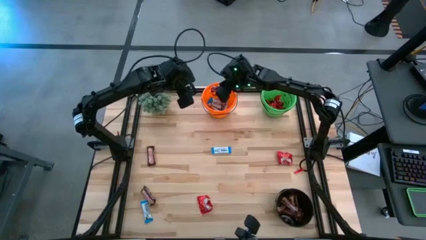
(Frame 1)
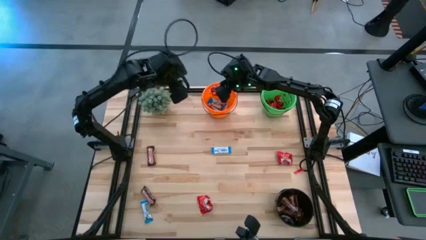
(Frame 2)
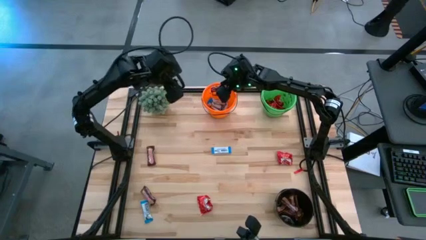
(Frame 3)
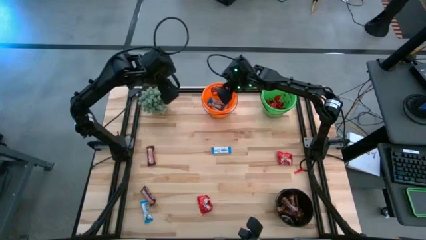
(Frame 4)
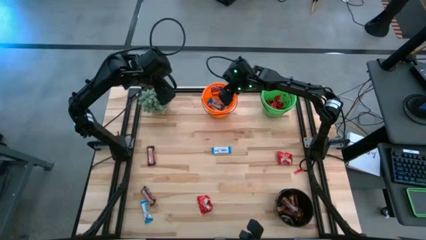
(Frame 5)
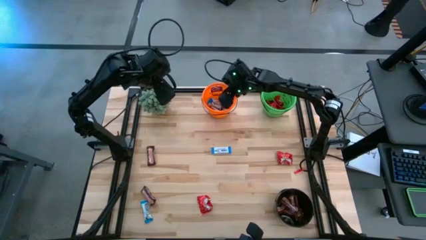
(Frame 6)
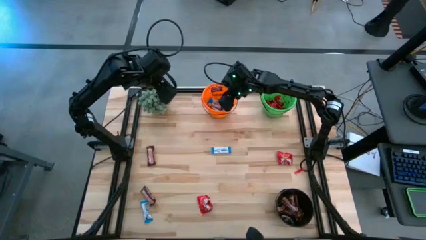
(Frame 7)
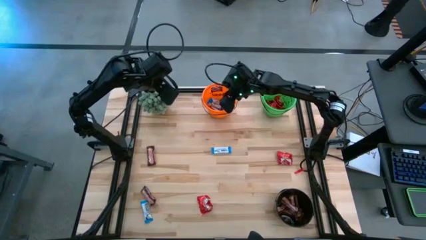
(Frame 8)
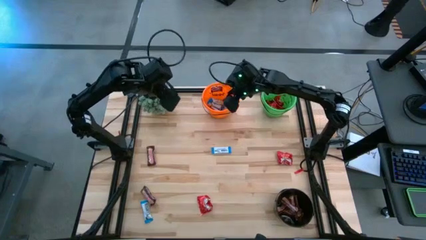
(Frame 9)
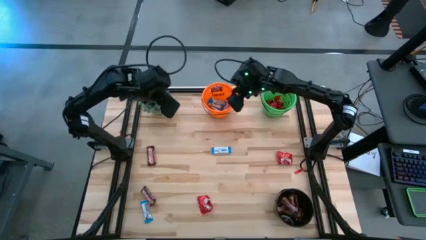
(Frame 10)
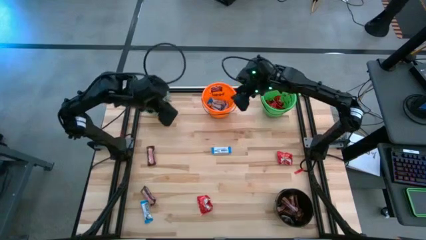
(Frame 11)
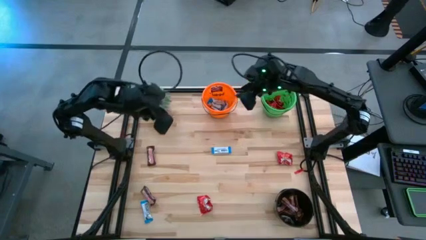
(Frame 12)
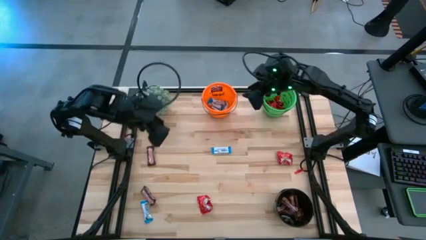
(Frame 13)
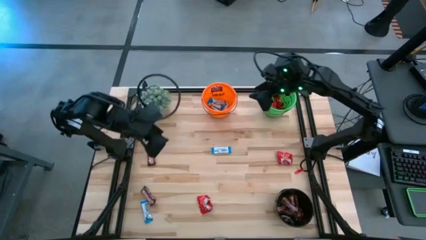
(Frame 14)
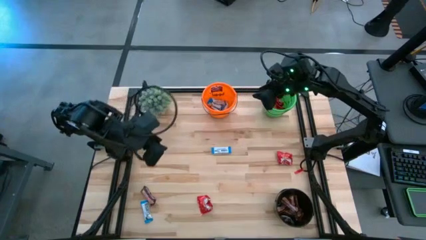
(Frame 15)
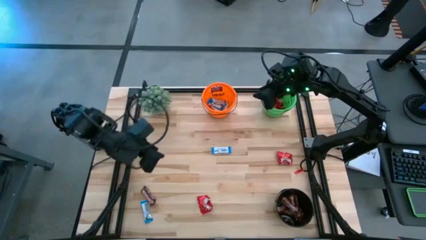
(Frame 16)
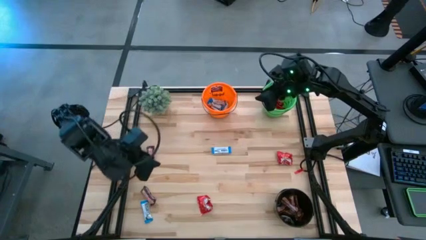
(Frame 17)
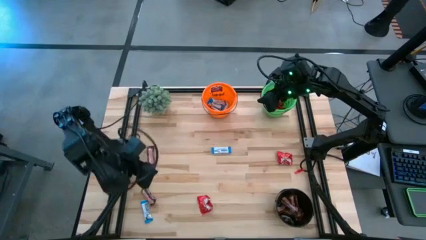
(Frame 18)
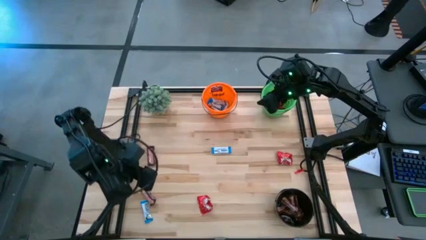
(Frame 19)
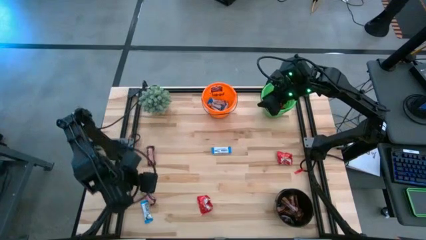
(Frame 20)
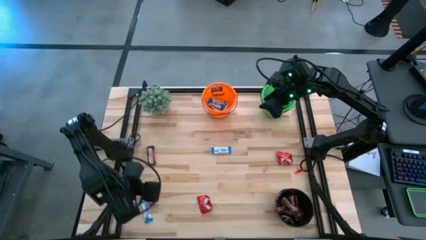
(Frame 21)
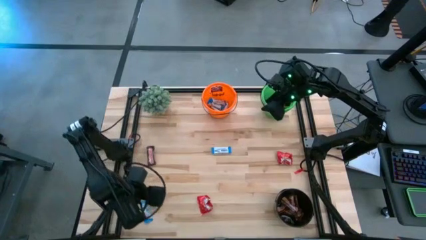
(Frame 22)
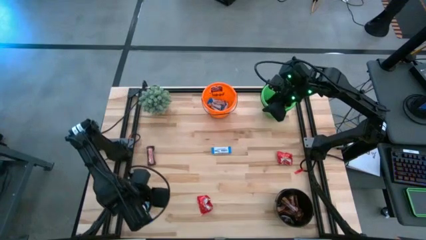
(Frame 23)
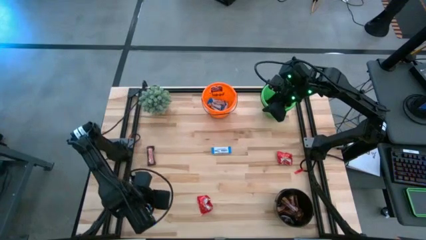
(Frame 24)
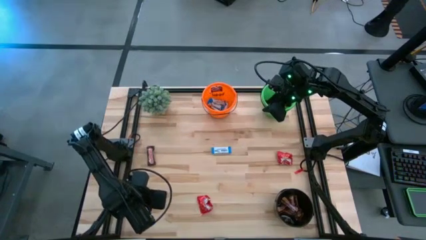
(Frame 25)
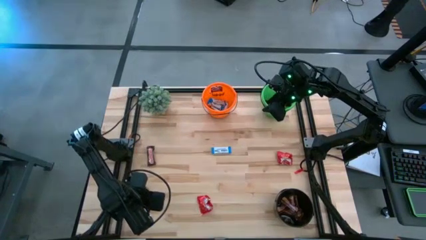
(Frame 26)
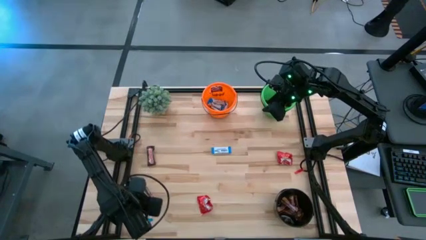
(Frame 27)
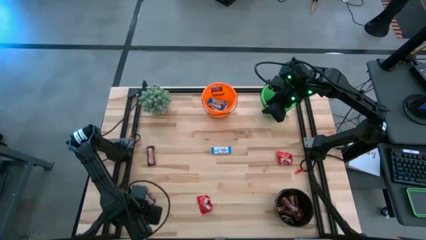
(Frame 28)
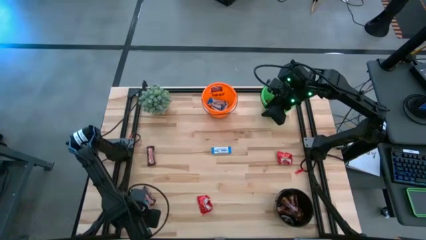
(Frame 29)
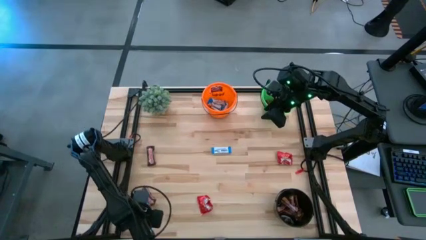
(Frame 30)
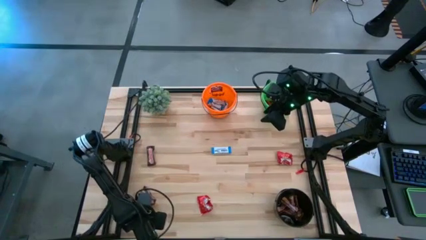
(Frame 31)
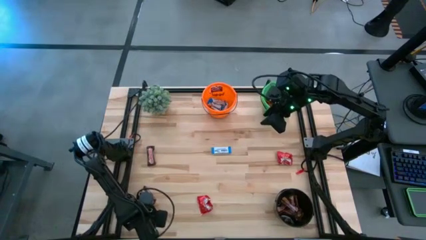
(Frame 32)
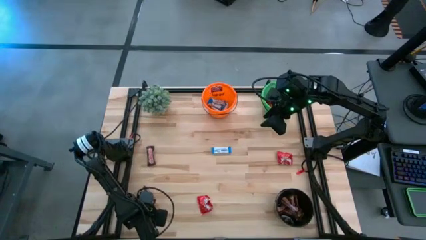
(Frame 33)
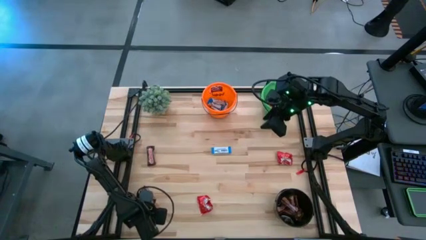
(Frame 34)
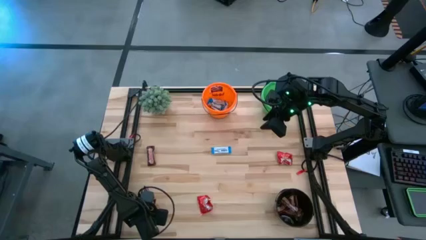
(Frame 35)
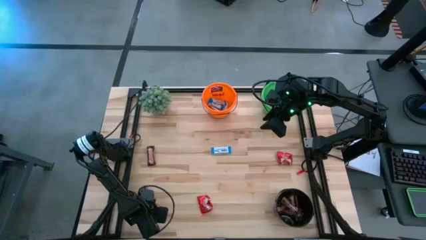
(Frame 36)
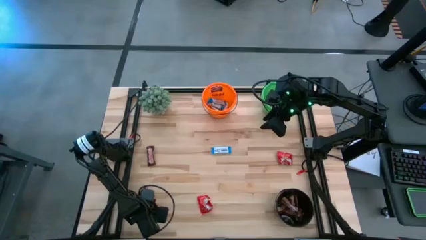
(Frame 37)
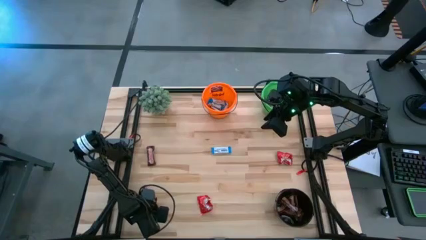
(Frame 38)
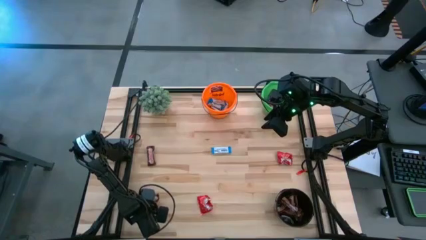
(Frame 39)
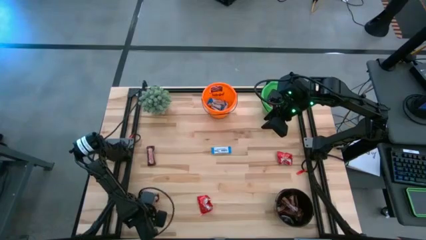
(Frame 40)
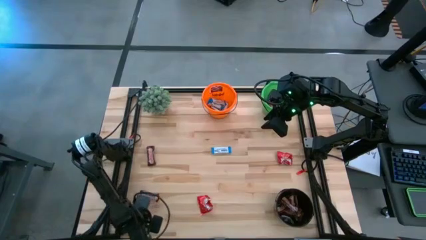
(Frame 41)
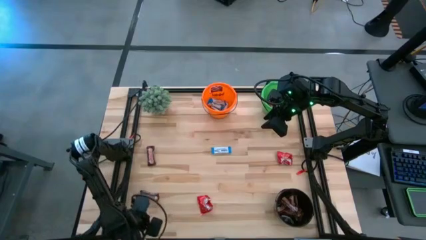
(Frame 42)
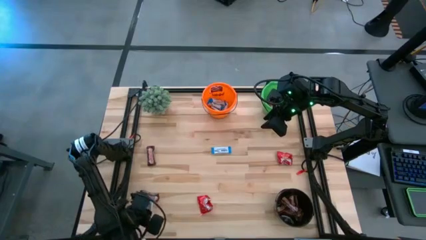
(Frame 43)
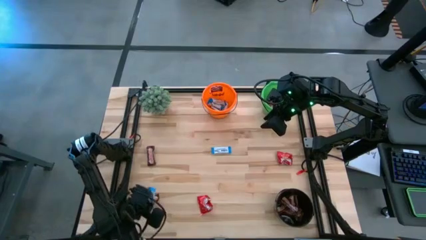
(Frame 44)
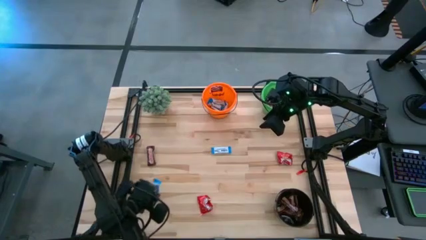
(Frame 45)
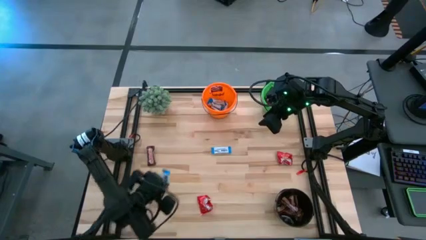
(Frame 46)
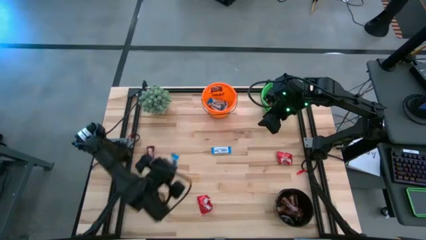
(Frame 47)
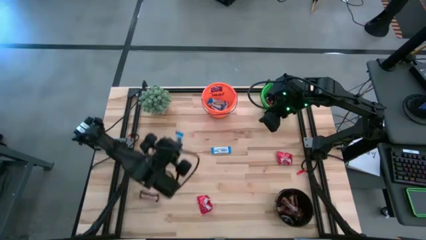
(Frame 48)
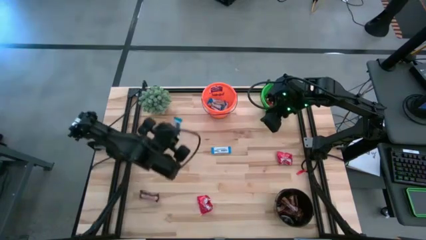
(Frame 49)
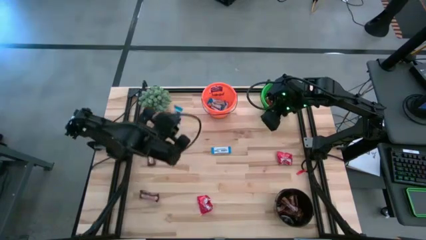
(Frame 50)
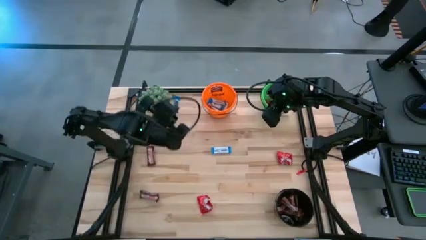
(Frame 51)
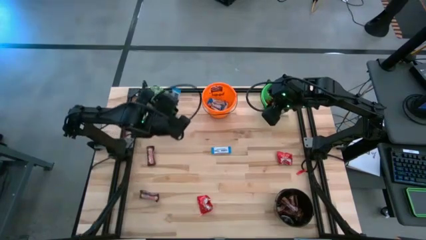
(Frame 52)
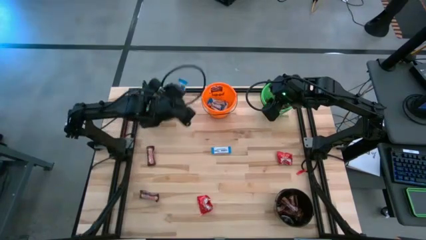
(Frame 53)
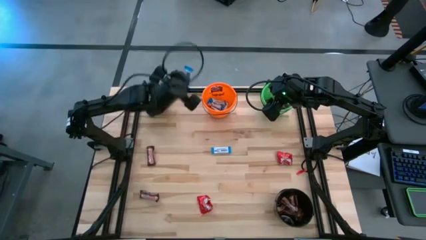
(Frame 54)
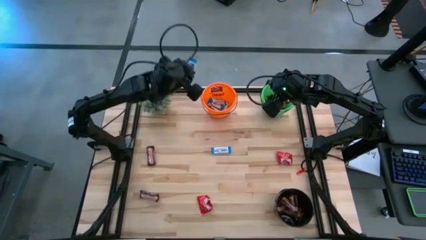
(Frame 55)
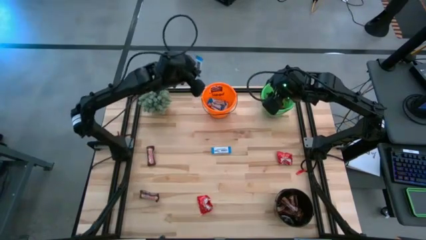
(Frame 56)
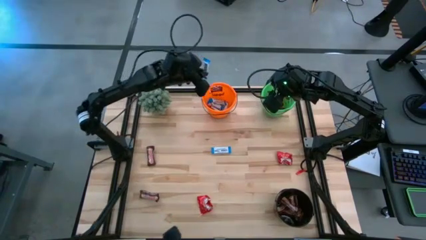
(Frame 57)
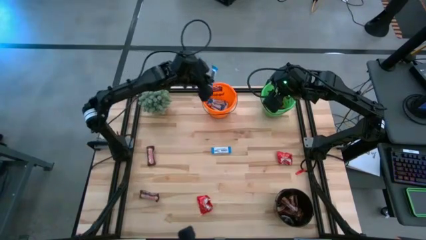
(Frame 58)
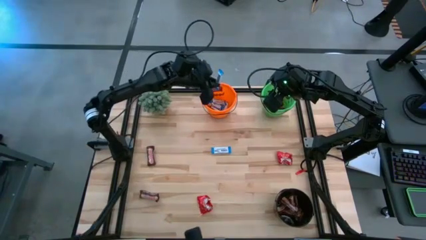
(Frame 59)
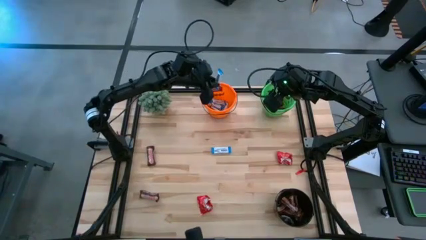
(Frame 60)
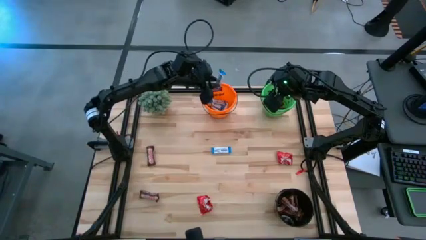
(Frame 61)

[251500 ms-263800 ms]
Task: Organize candy in baskets
Put the white chocolate bar into the orange bucket

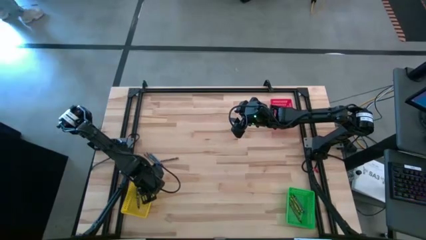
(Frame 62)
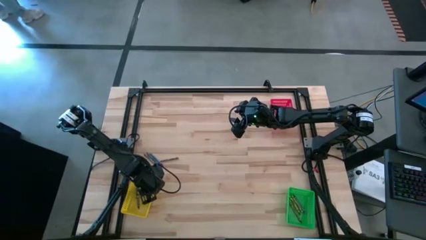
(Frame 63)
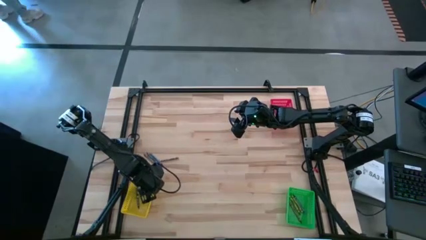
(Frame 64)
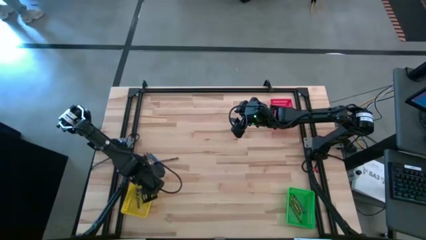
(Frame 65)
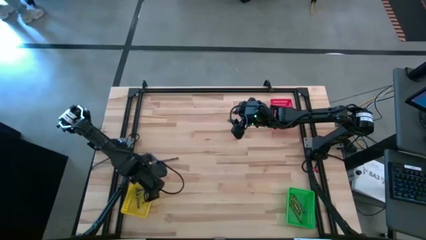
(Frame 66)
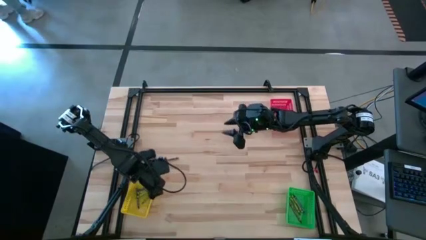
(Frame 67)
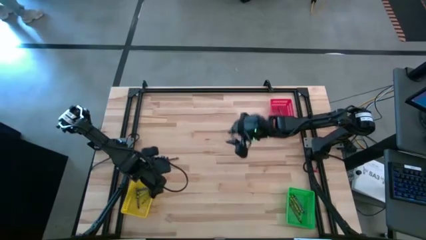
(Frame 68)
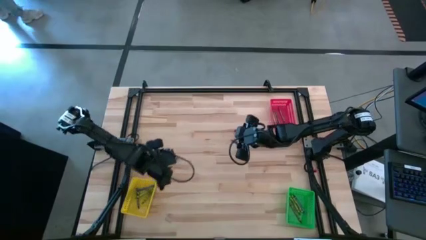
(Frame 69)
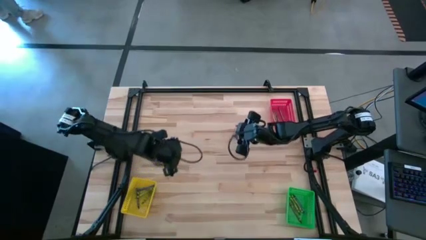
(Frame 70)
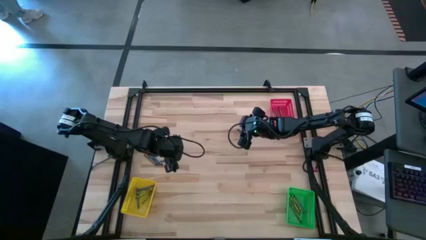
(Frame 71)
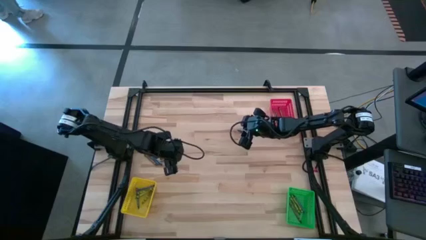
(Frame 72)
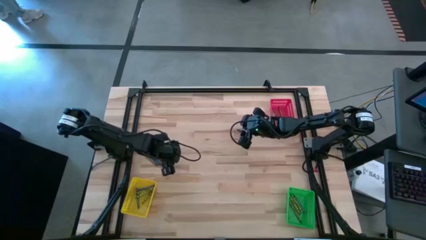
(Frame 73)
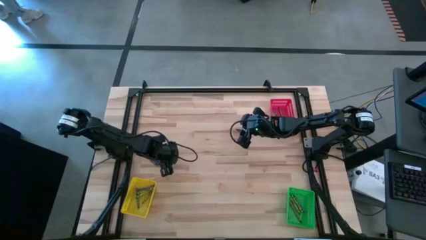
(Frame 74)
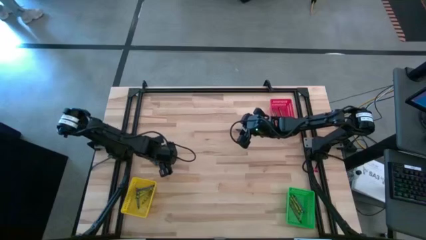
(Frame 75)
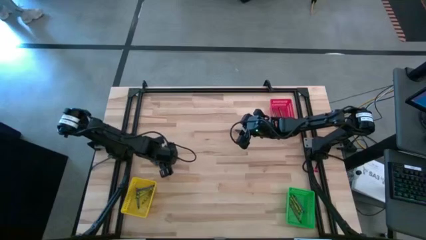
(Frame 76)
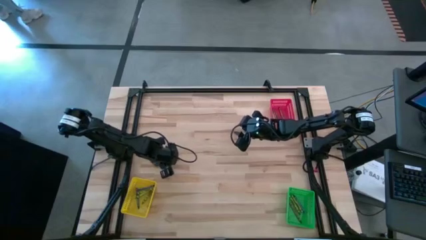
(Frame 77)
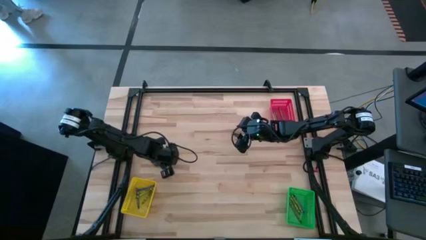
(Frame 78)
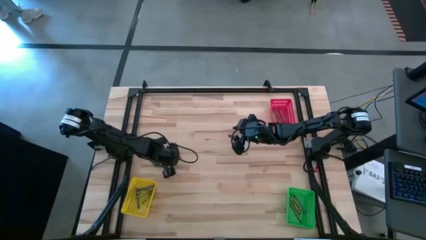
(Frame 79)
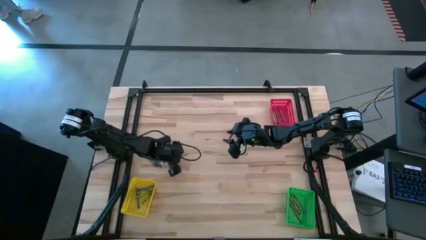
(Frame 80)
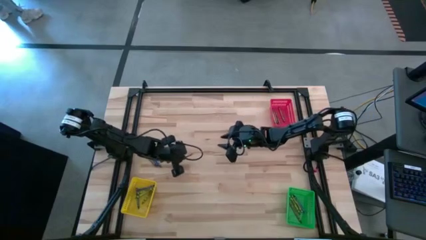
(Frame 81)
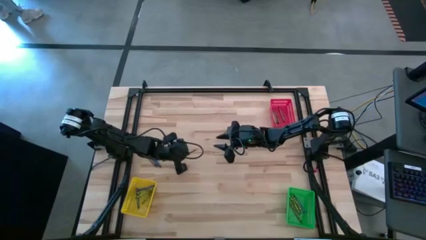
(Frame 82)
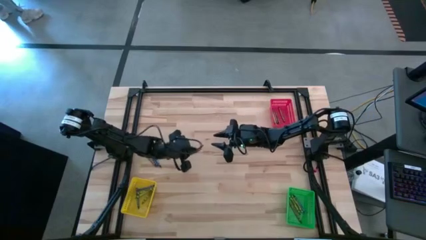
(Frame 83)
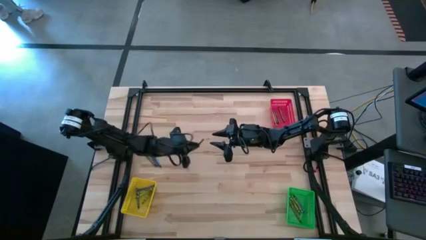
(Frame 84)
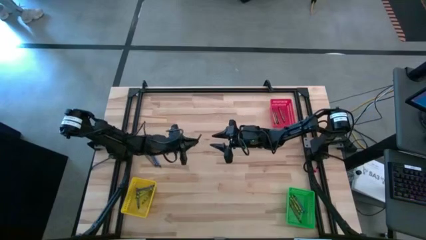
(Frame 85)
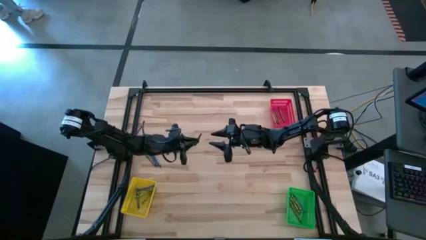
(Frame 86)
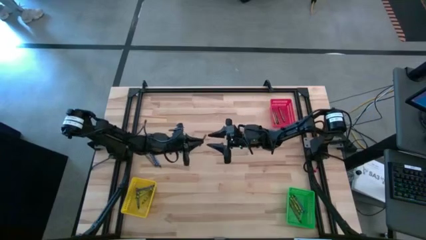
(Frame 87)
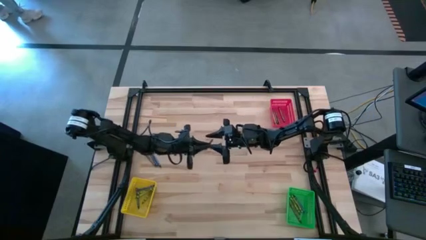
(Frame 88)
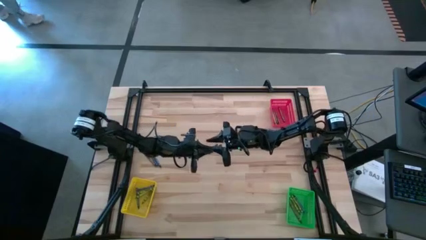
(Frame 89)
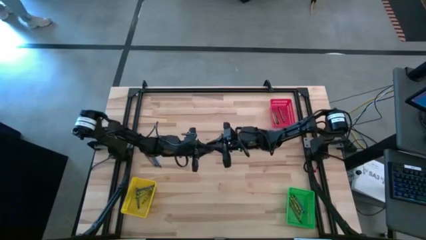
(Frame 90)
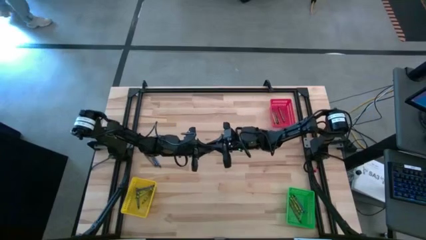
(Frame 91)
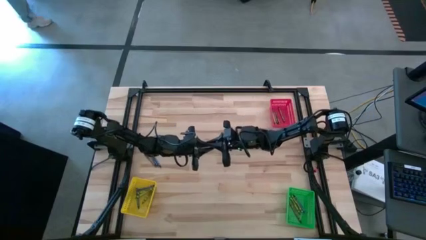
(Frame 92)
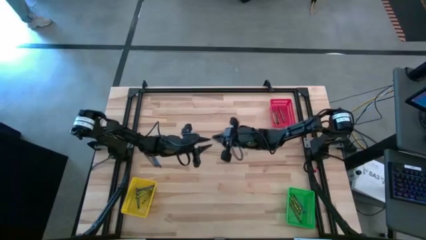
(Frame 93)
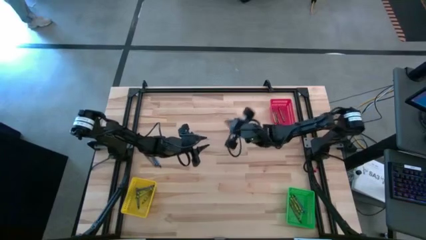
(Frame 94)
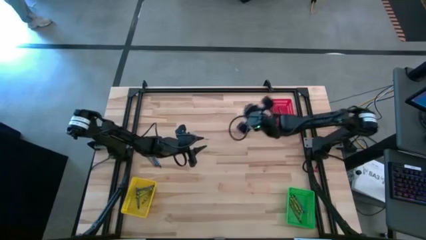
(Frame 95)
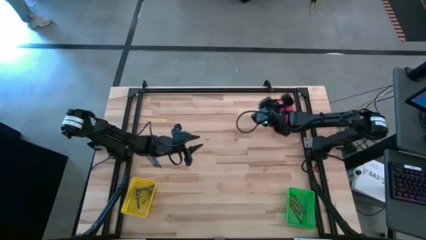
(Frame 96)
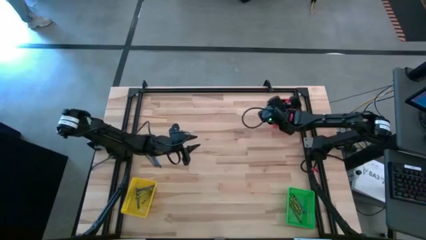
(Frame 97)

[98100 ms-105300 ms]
Task: Sort crayons
Put the brown crayon into the red bin
